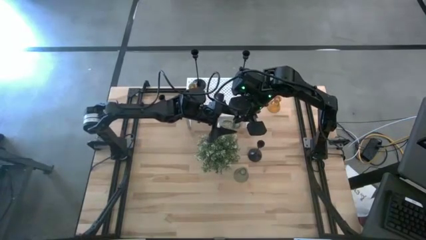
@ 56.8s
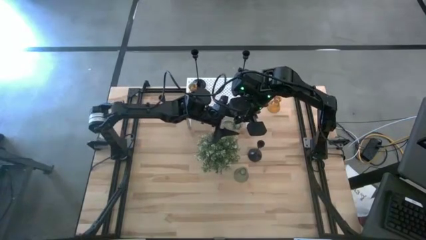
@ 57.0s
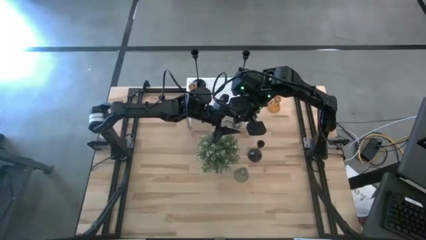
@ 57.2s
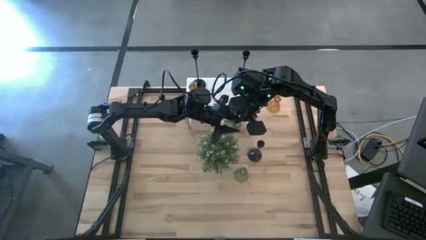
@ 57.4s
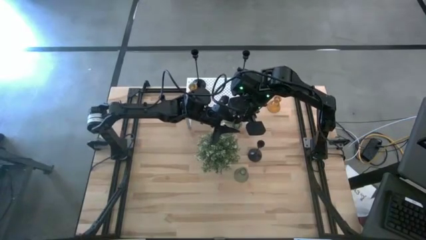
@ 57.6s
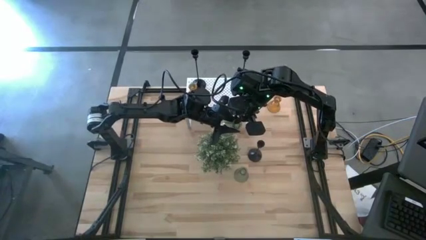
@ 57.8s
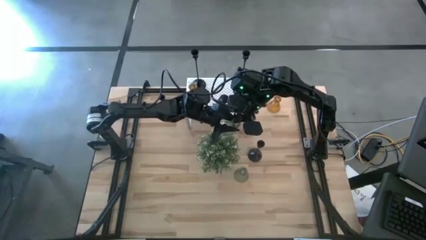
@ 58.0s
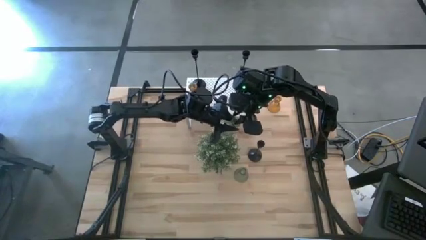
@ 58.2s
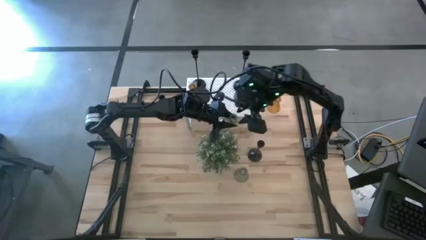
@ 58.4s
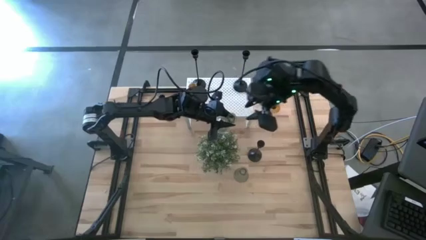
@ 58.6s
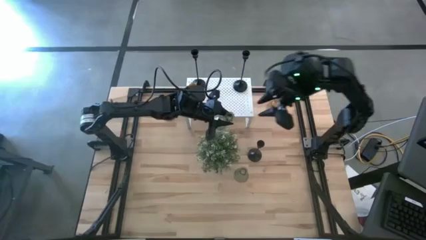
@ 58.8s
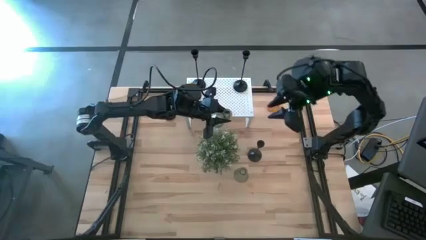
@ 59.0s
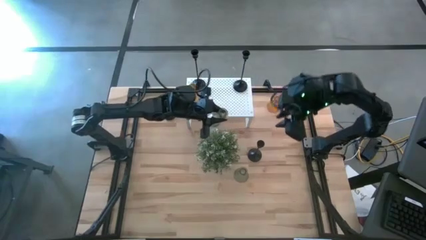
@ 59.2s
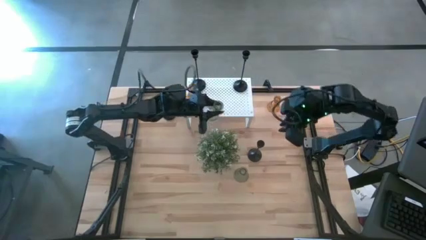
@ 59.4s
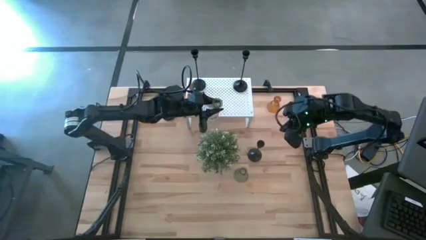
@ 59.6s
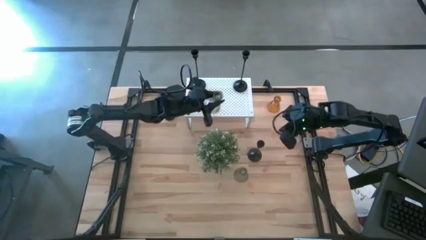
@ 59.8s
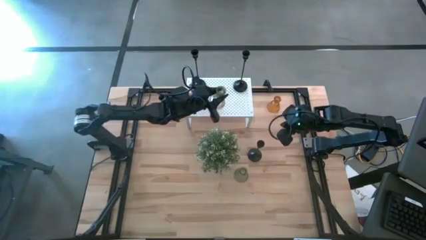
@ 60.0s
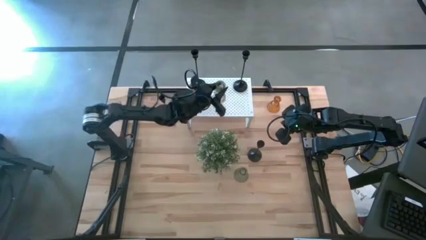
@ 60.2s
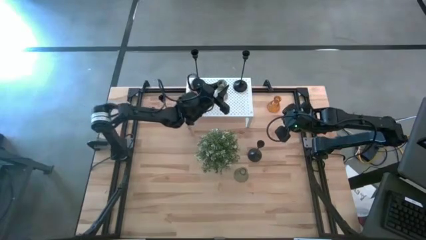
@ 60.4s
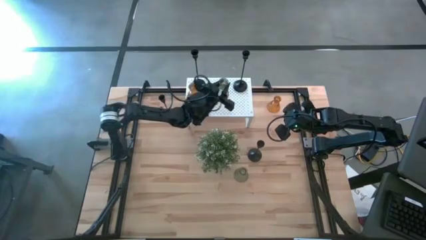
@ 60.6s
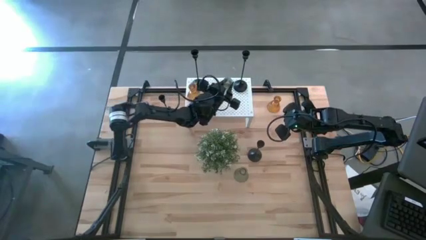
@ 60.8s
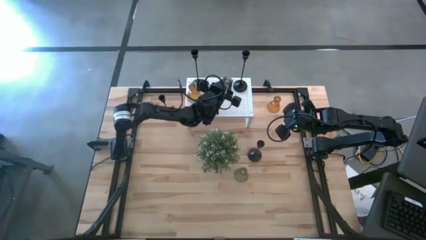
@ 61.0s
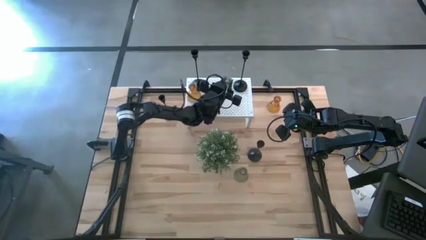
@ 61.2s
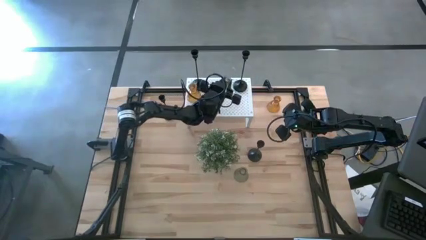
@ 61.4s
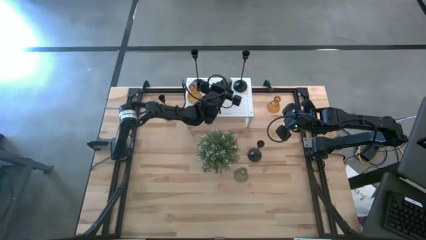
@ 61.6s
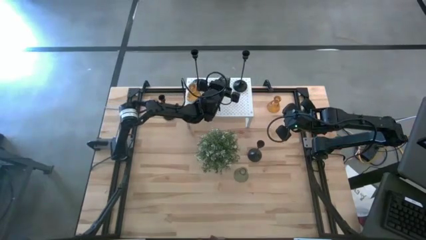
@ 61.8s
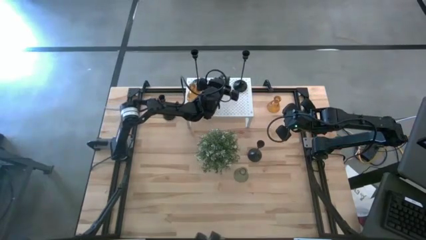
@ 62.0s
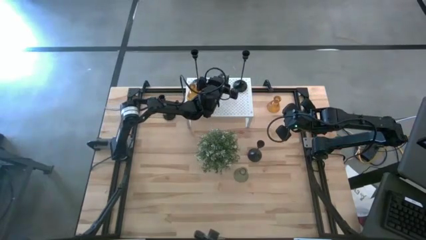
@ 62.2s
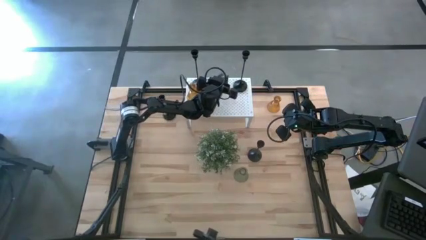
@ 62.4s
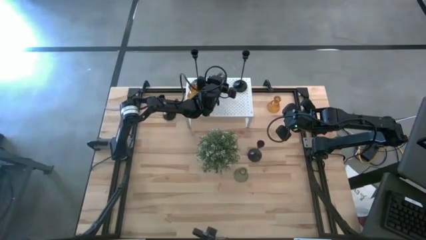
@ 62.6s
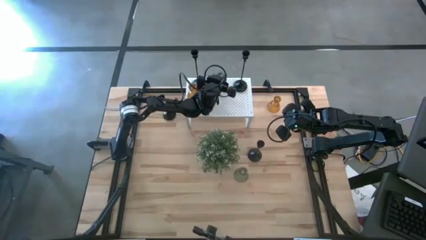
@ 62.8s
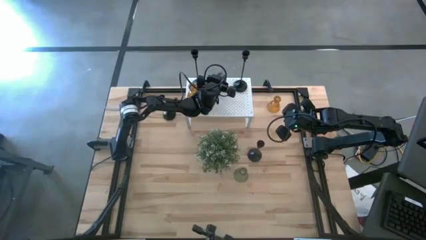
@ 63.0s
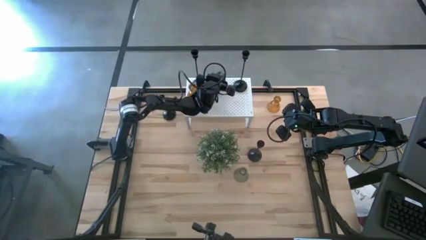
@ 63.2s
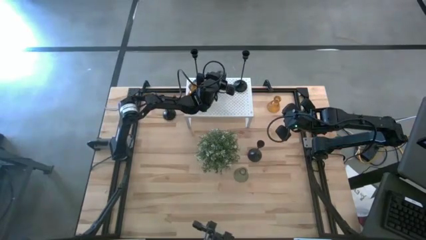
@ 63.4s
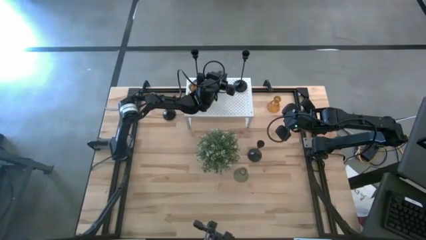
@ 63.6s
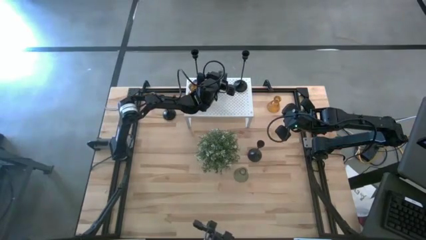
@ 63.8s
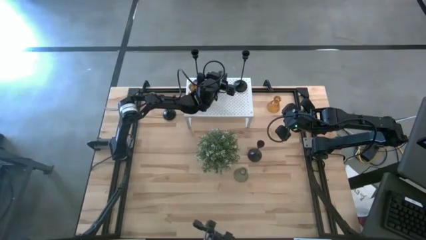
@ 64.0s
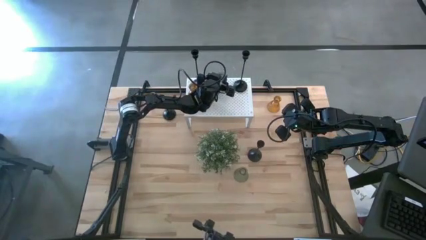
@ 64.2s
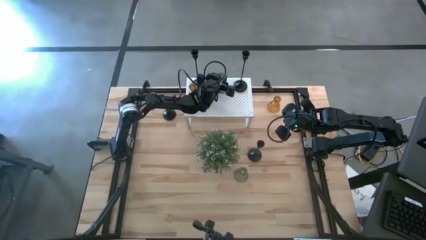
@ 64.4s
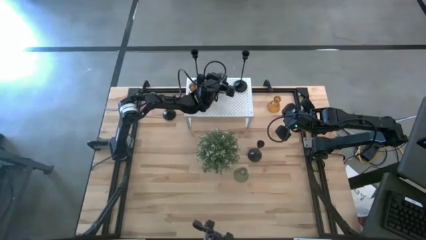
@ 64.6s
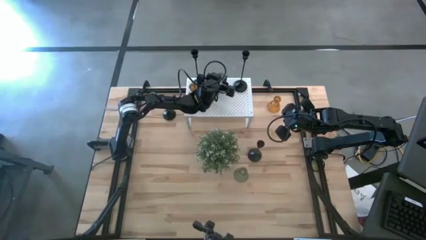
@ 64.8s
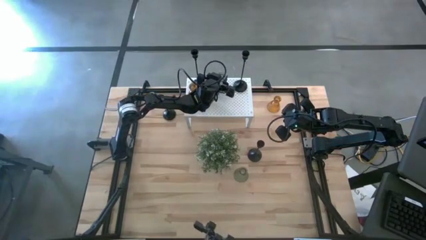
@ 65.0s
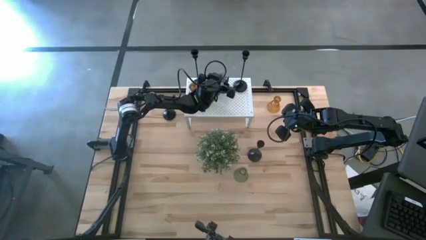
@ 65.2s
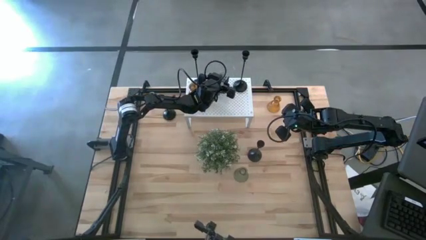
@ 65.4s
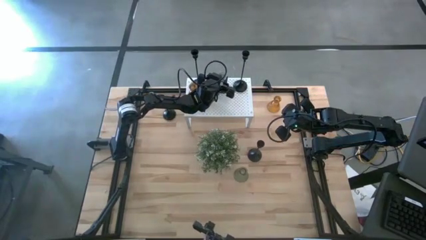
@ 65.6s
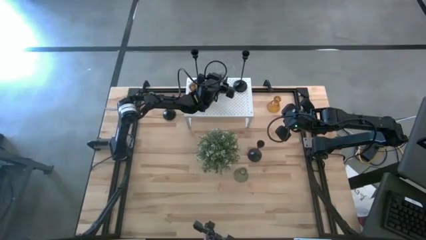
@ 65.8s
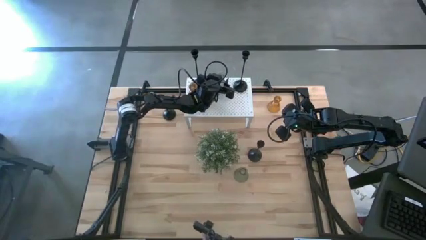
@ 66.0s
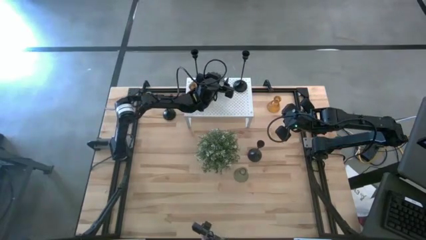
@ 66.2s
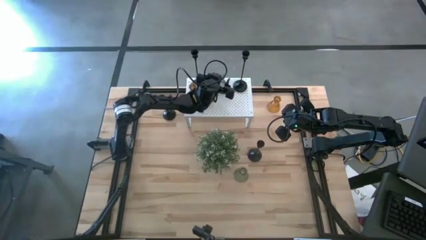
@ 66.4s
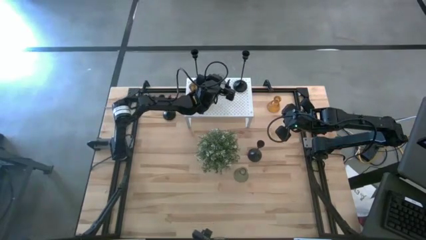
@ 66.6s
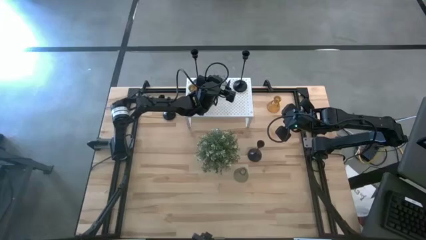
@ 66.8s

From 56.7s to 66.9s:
Task: Pick & Place candle stick holders
Put the bottom green glass candle holder on the shelf

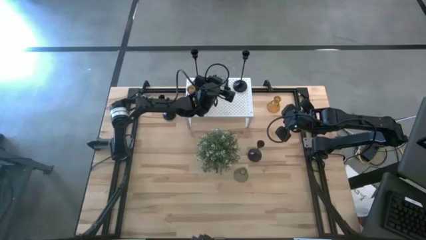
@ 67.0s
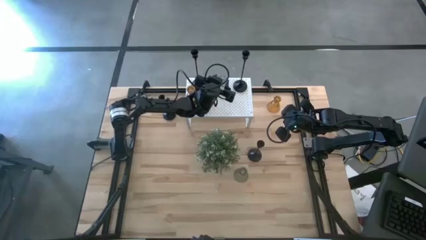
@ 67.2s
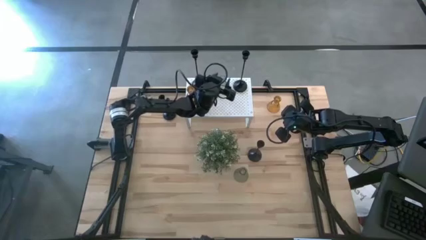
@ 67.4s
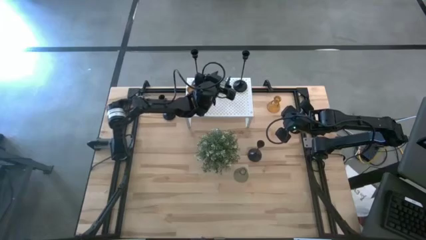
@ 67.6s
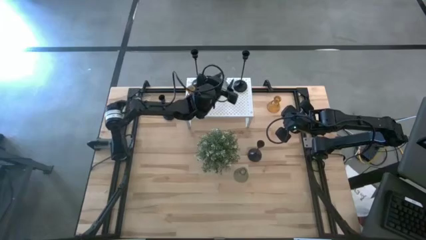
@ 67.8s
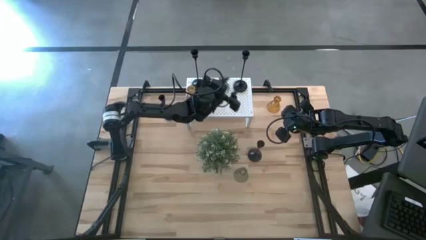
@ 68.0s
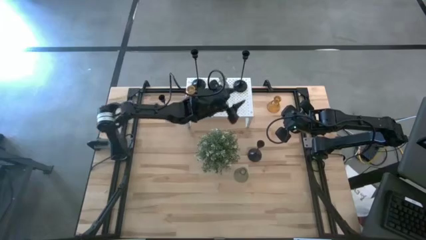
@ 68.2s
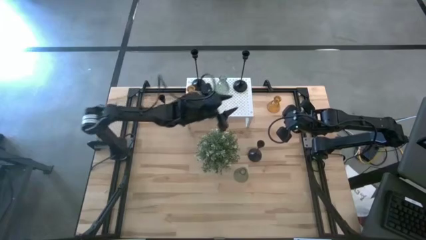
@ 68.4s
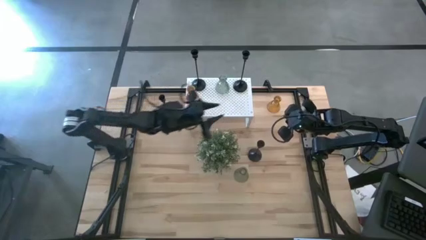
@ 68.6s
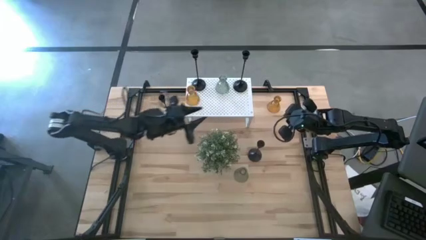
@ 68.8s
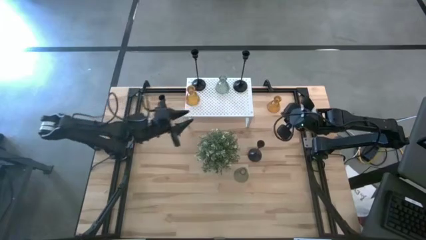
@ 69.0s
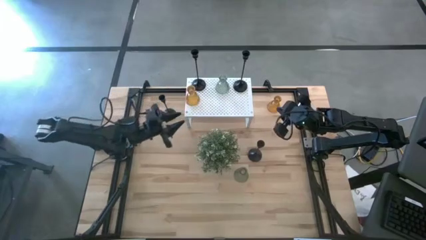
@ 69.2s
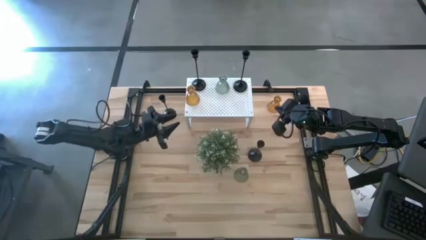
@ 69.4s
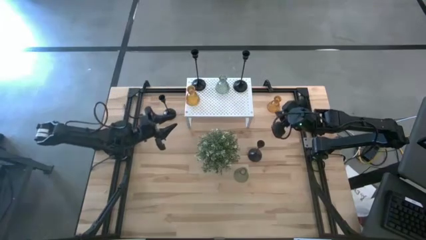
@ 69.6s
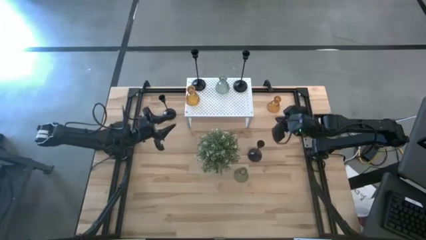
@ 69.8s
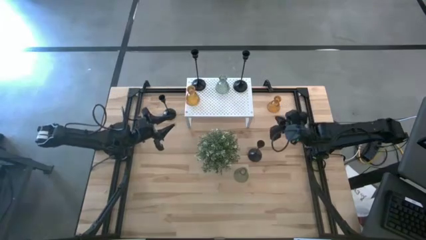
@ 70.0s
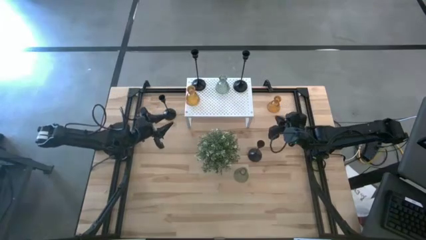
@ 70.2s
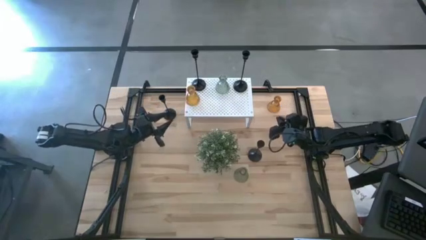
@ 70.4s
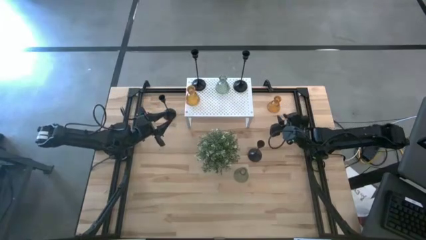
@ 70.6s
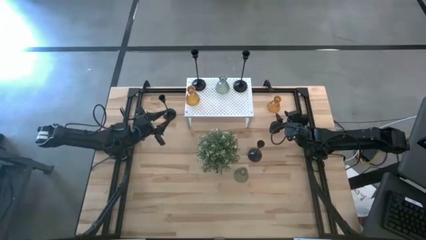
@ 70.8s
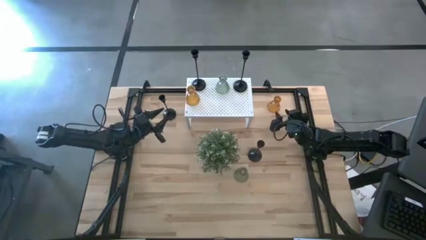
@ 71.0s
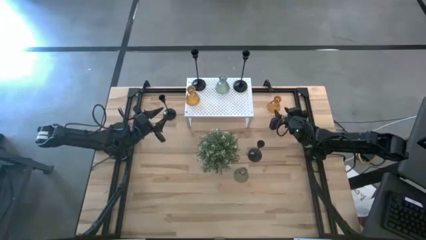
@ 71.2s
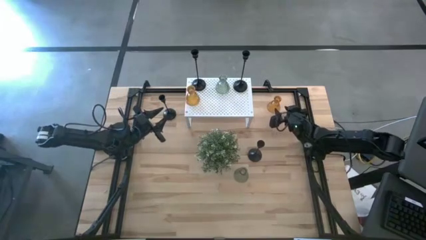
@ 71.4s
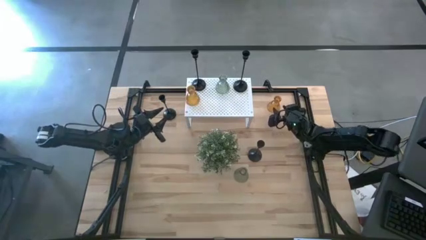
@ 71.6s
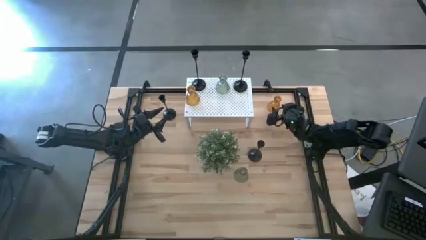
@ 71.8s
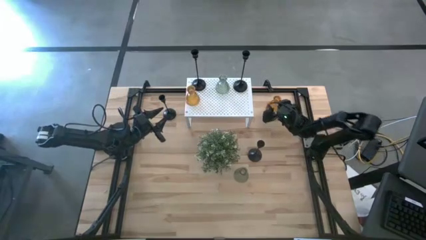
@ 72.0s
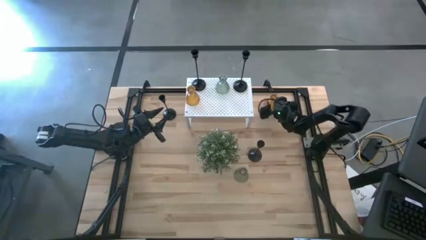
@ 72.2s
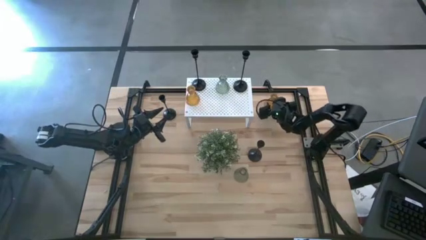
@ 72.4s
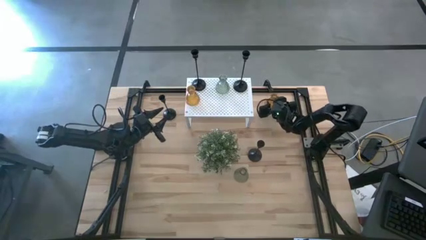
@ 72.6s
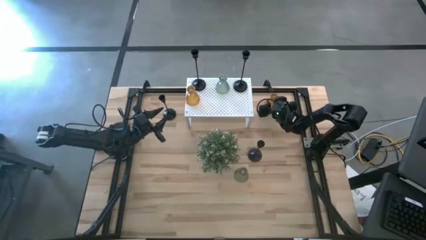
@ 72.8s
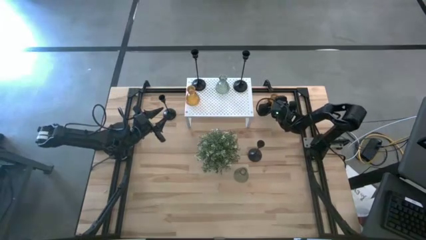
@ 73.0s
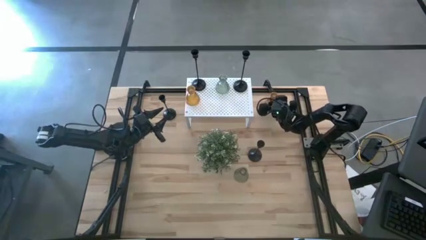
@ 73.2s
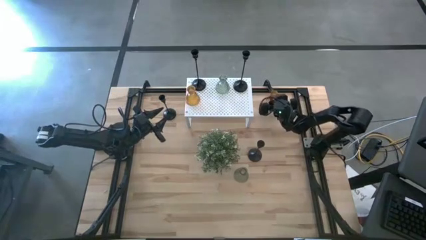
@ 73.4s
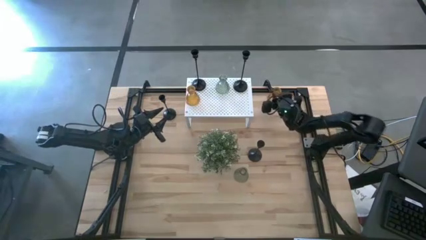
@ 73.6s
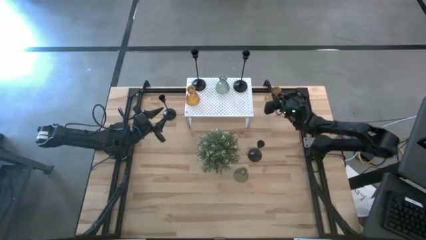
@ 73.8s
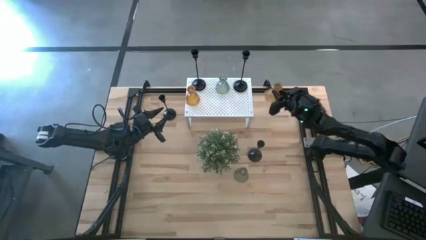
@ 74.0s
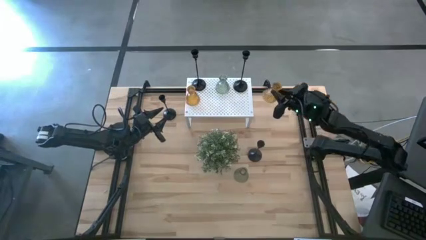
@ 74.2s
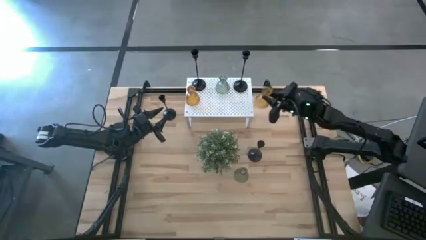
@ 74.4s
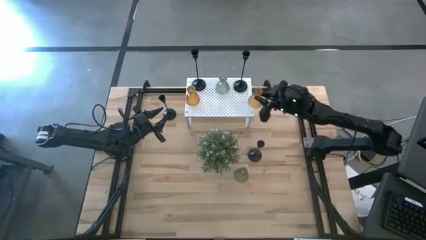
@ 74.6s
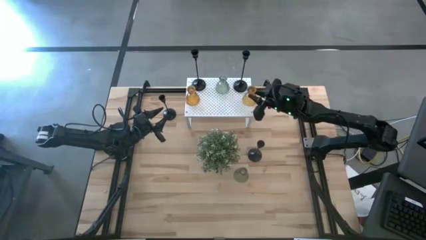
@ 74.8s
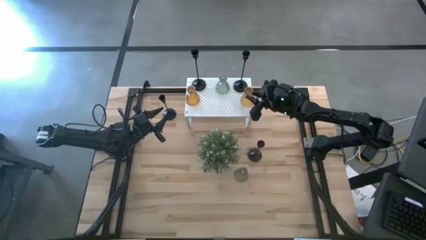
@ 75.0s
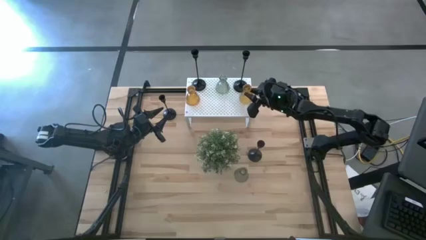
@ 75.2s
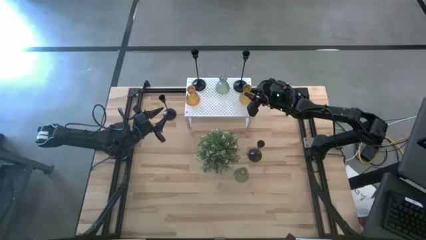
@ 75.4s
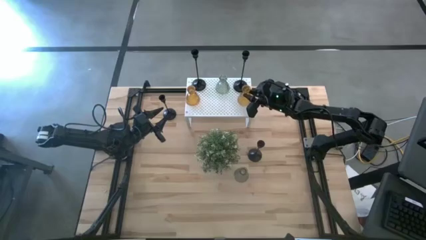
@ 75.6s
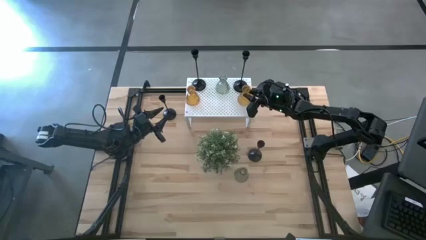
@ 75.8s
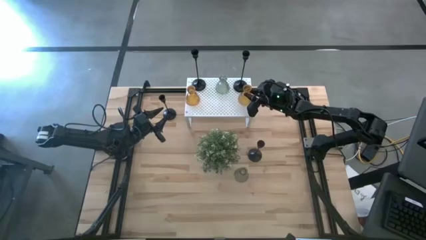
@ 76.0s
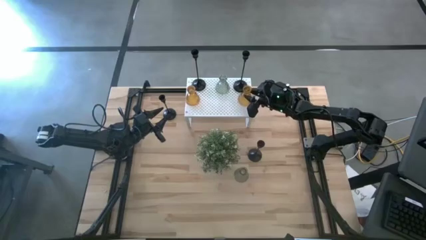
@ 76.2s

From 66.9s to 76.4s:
Put the orange glass candle holder on the shelf
